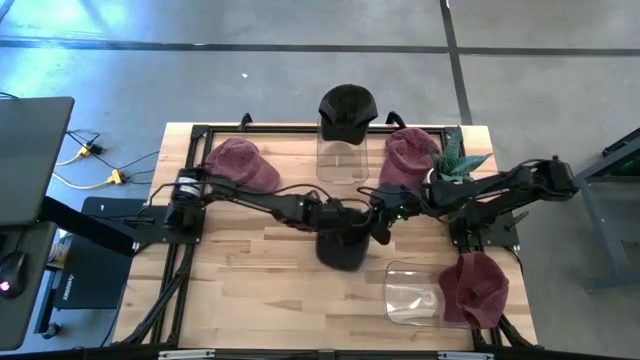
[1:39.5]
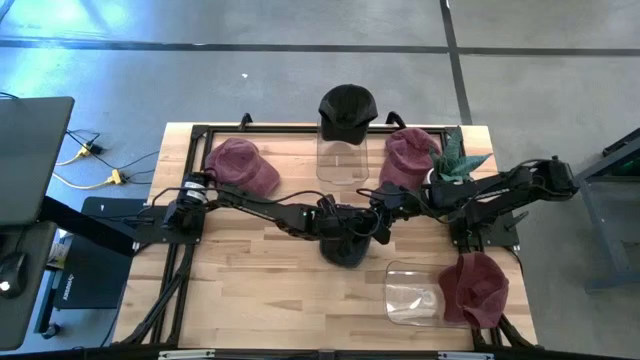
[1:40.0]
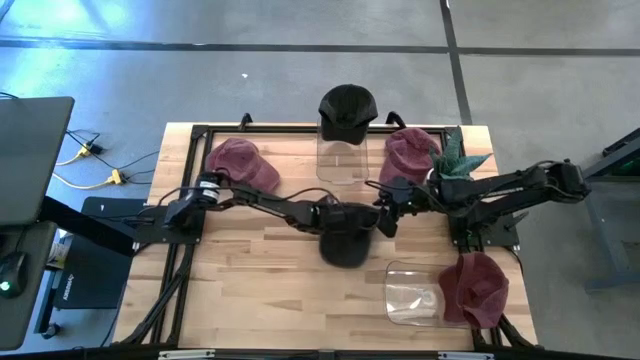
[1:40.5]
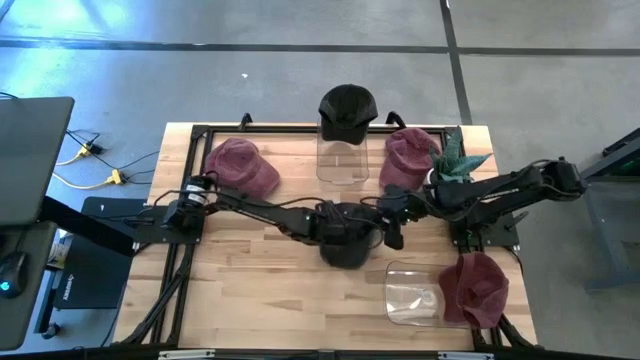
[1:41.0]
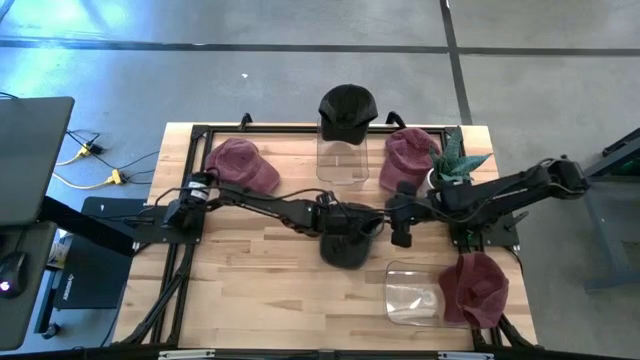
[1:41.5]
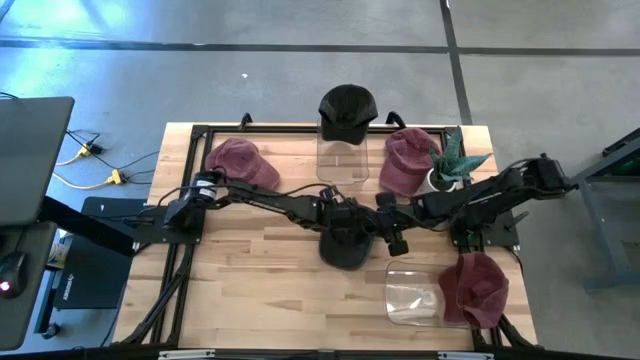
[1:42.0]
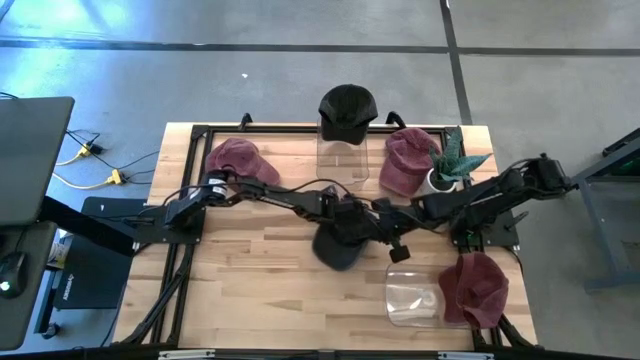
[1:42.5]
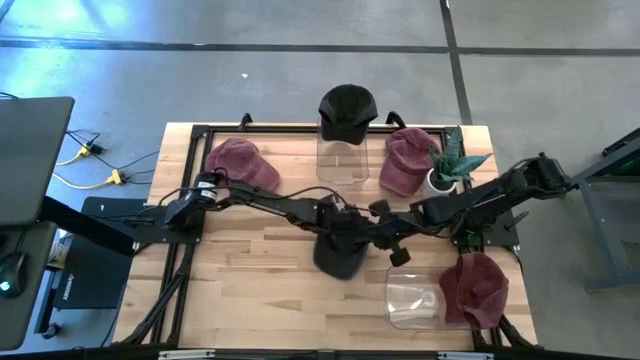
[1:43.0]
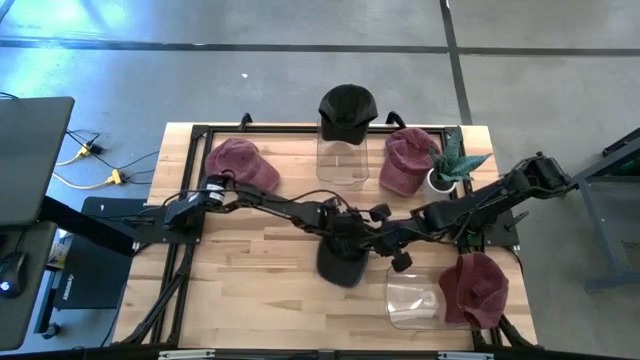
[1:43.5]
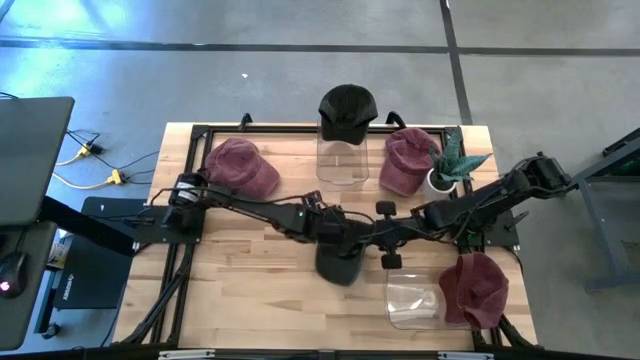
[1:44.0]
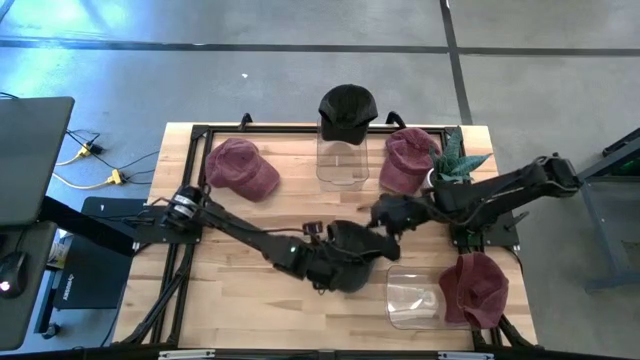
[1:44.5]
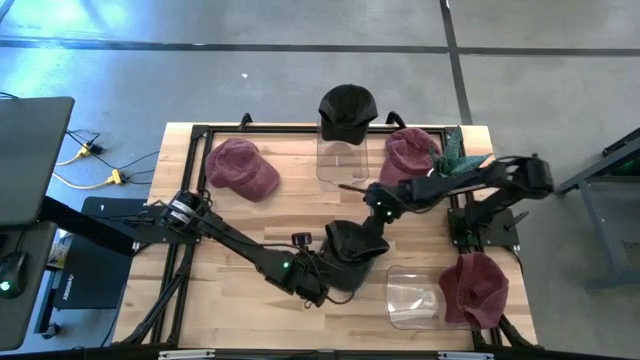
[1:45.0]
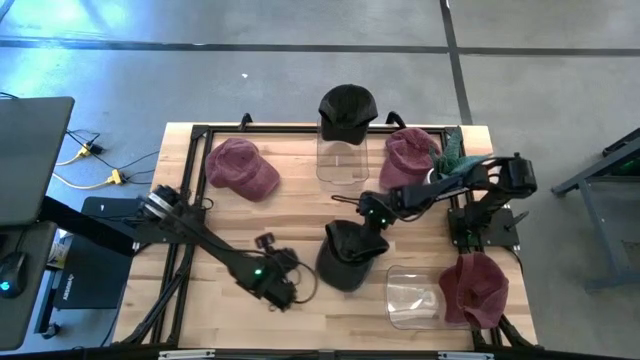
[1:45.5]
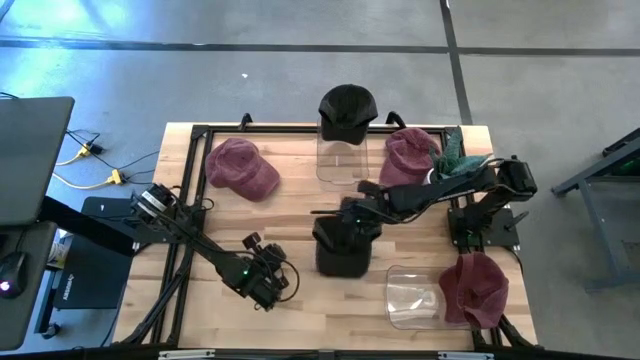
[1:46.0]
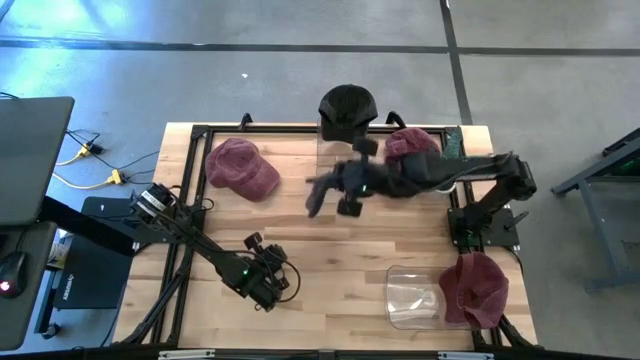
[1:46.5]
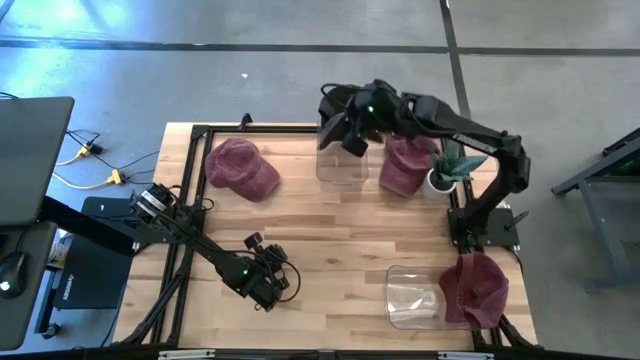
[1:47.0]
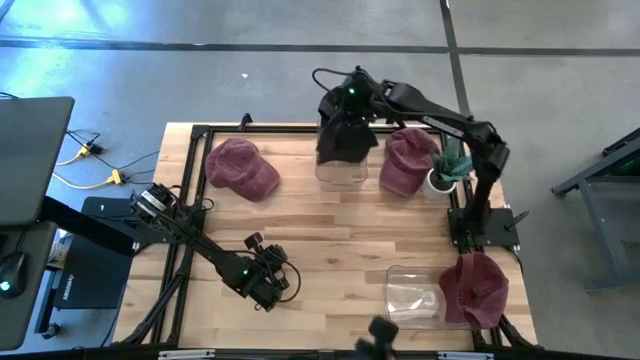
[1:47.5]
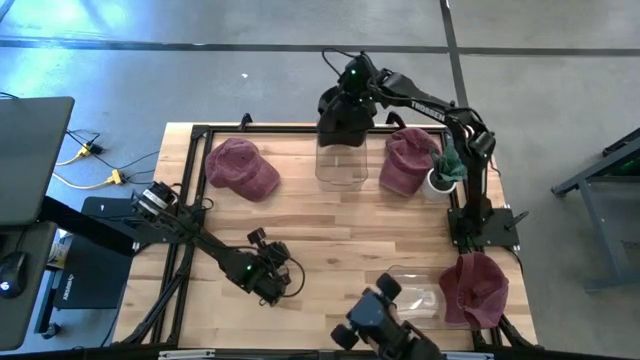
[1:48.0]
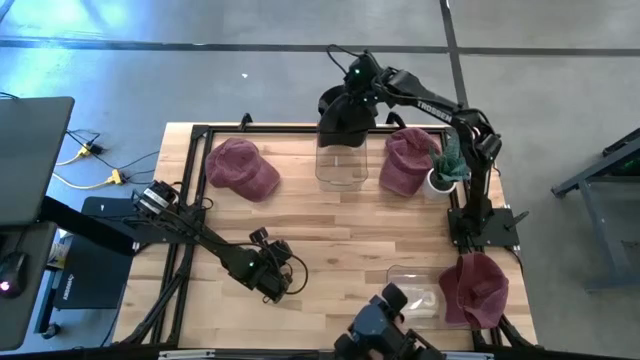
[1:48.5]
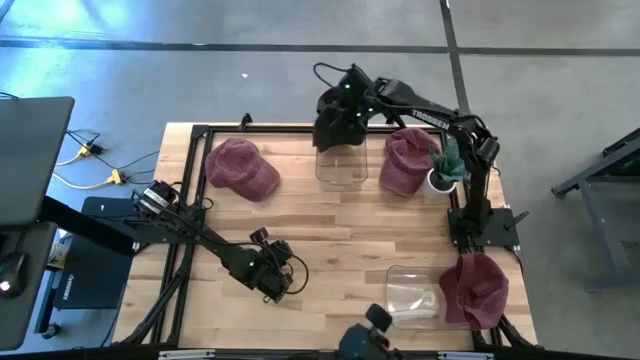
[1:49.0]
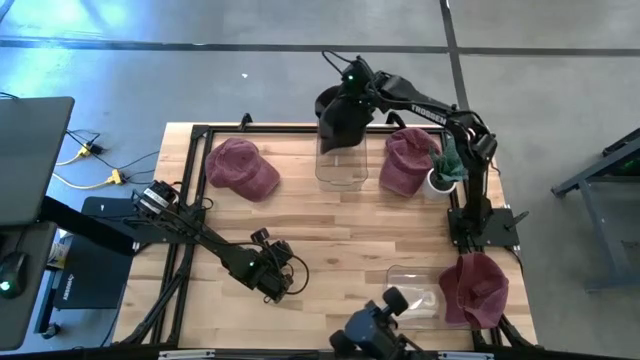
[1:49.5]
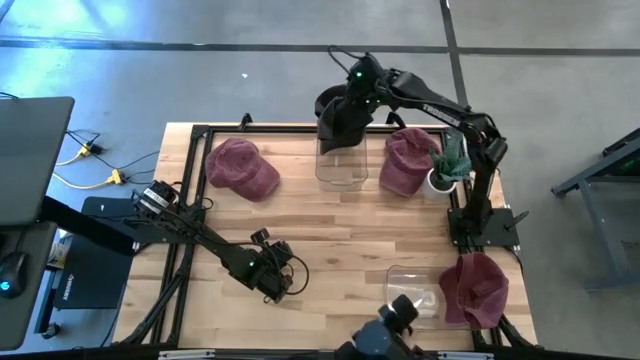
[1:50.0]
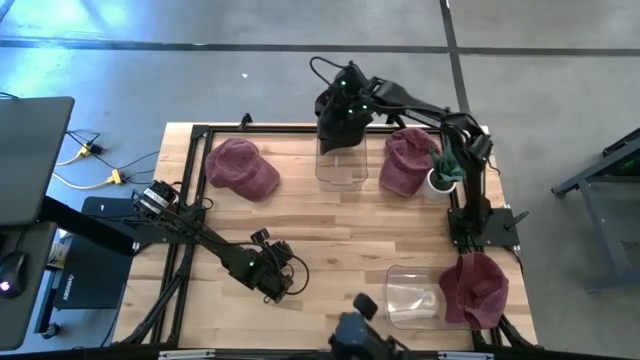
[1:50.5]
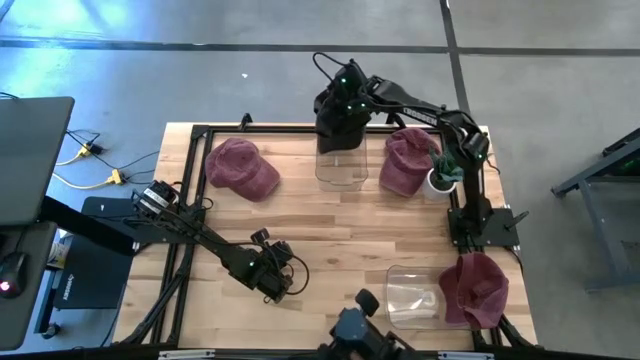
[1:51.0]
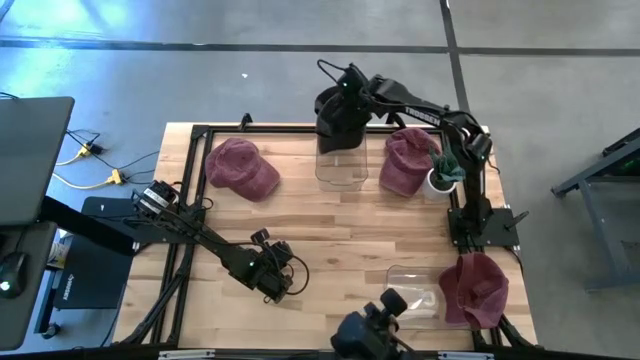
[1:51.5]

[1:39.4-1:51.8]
Task: Pick & Place hat
Put the black cap into the top transparent bin

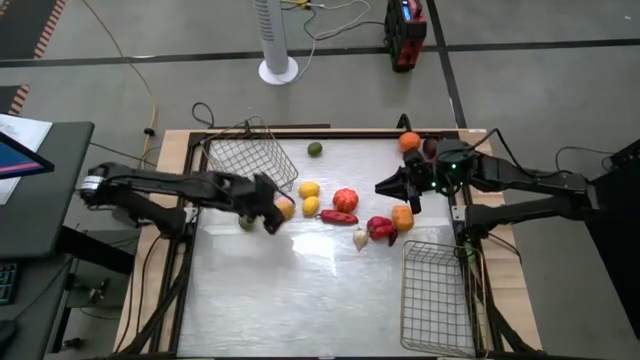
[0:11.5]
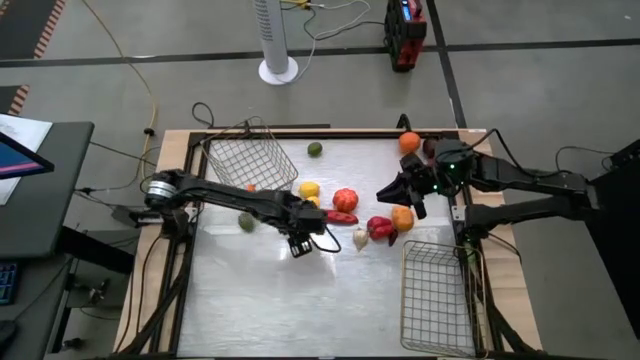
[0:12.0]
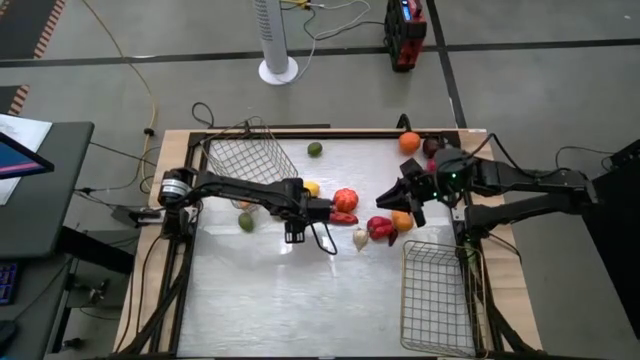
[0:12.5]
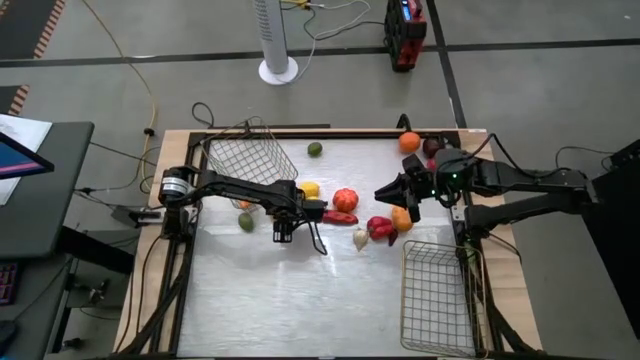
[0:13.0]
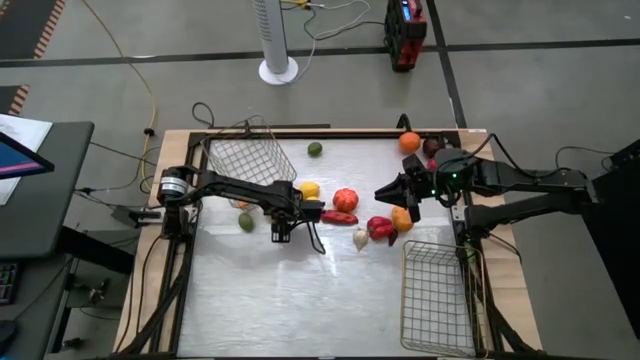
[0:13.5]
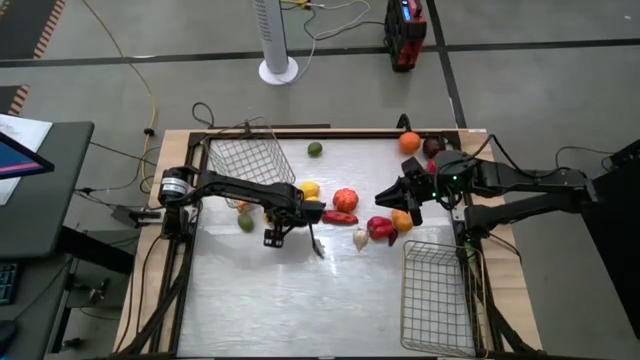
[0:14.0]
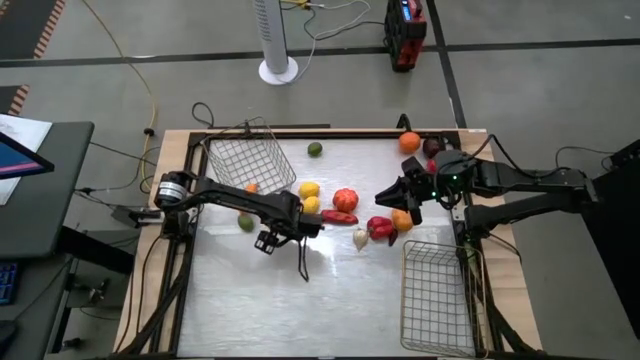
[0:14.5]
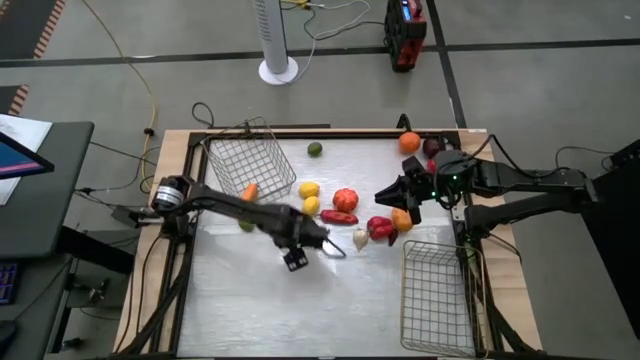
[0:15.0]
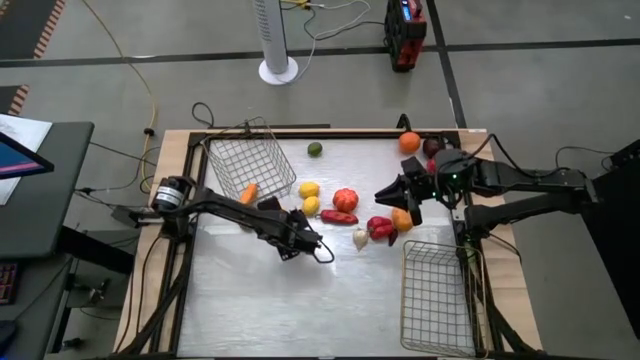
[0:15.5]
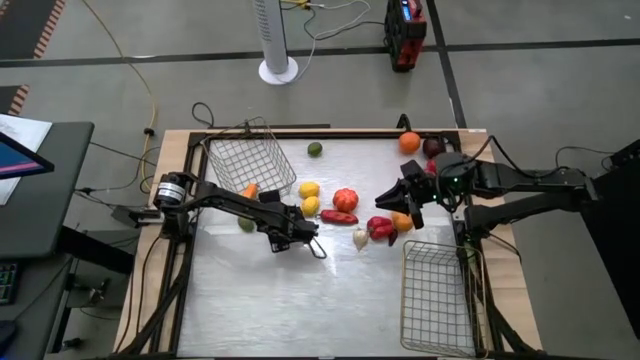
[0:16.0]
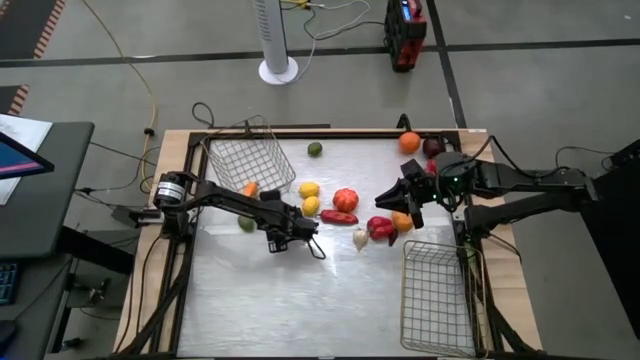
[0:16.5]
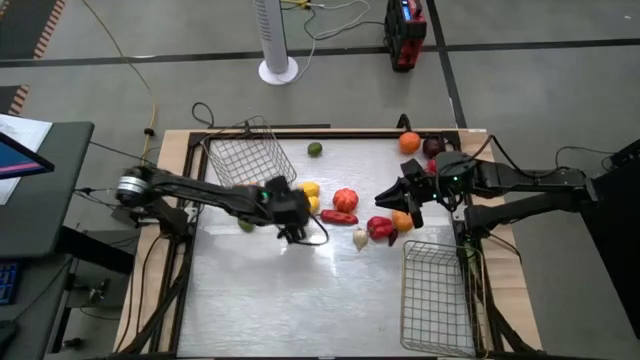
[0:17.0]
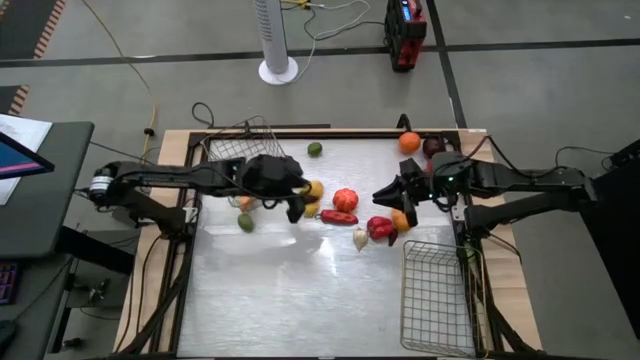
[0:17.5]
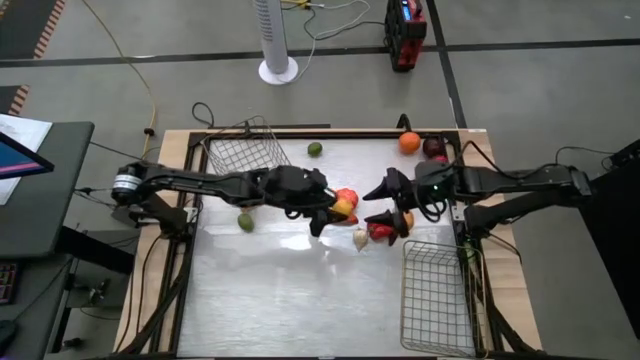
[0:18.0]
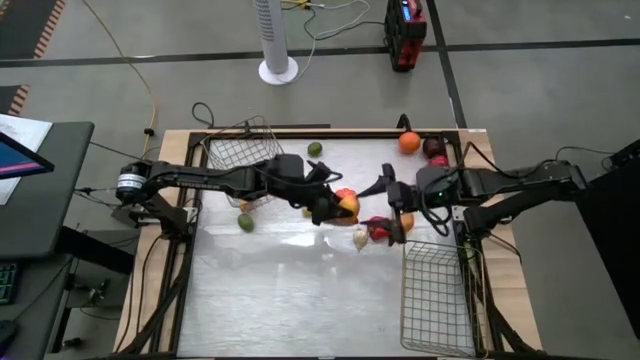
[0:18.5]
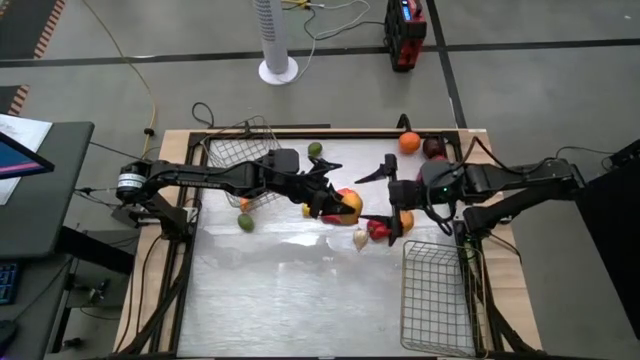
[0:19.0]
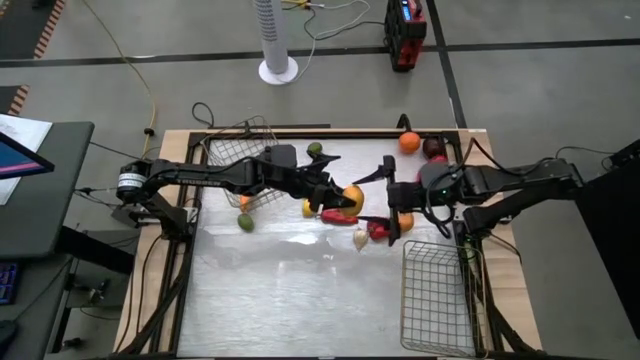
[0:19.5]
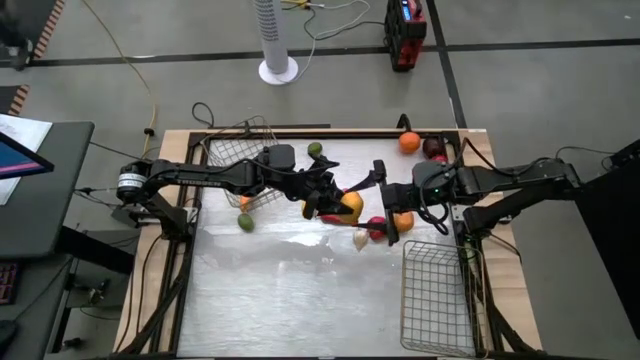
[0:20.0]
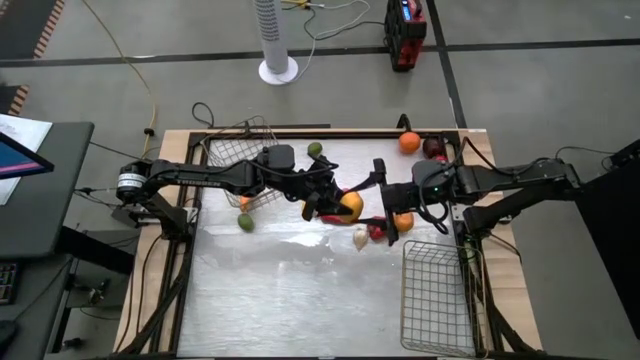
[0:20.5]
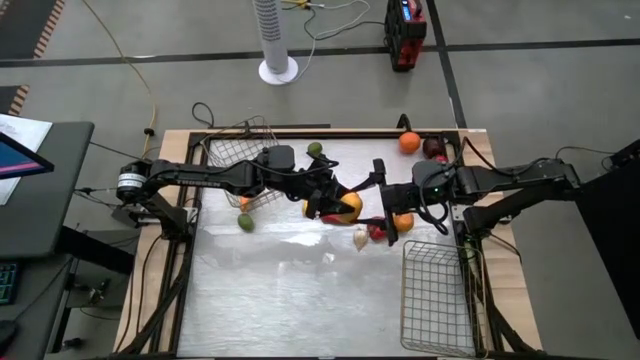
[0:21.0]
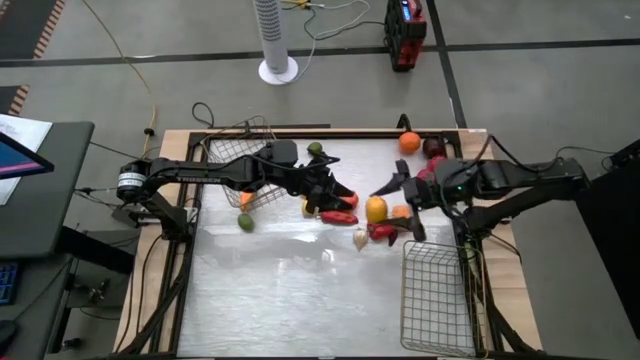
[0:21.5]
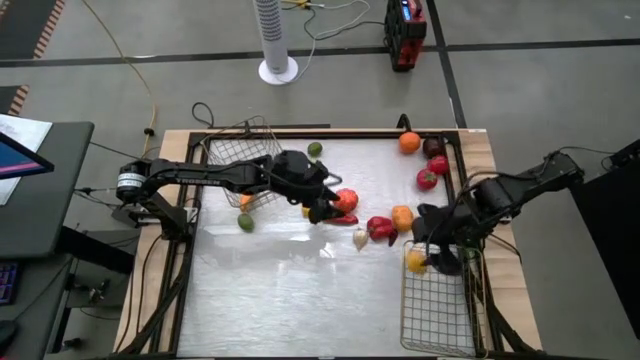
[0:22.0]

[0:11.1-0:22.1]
Task: Sort produce into baskets
Put the bottom left lemon into the bottom wire basket
